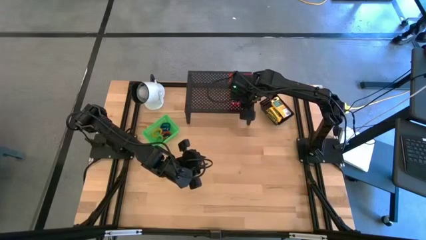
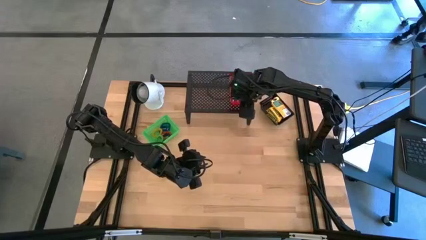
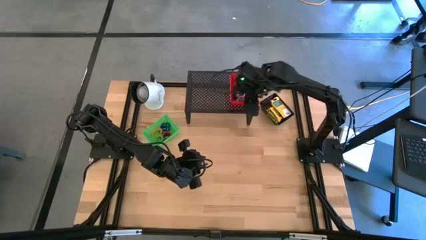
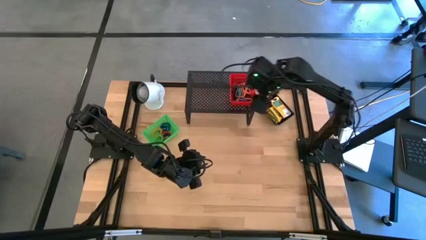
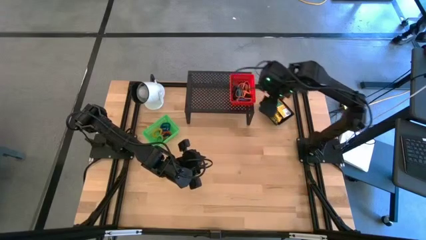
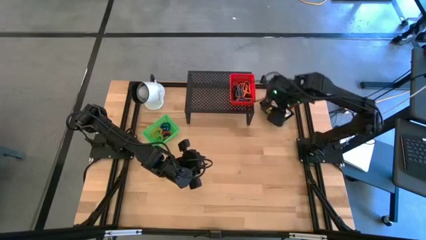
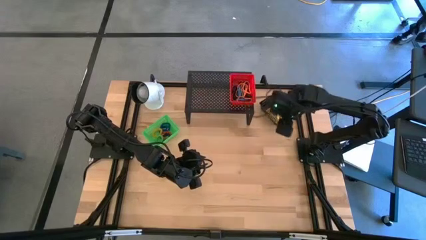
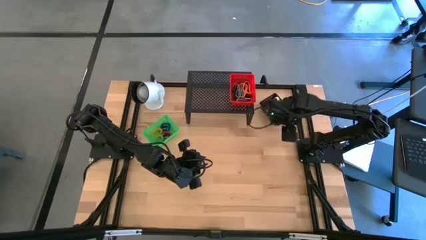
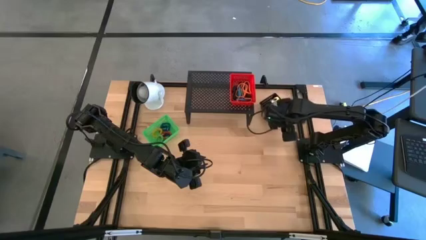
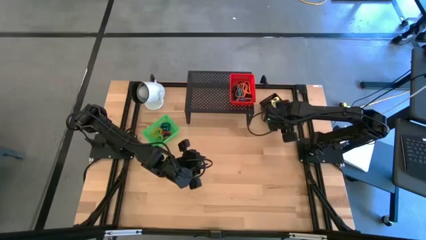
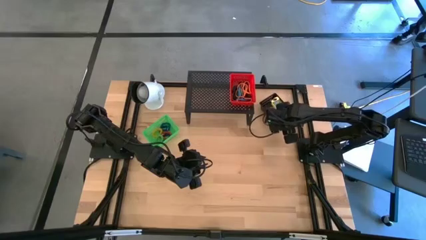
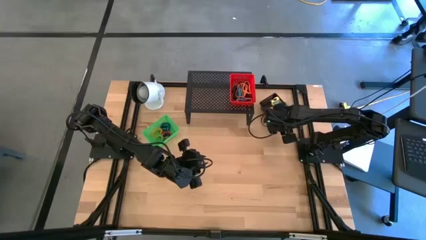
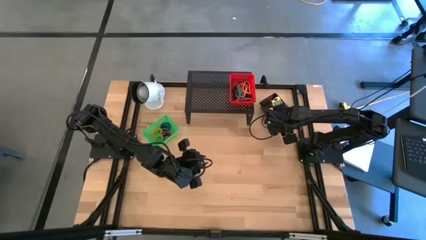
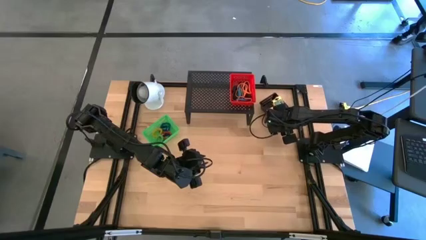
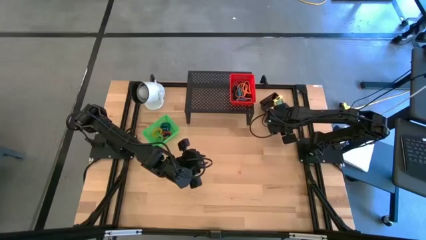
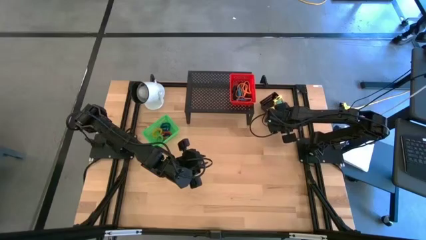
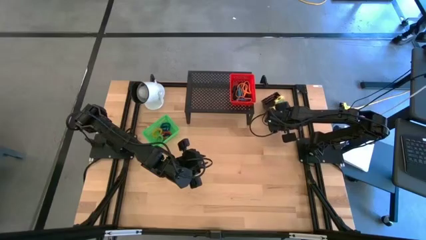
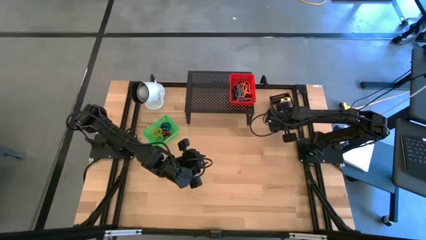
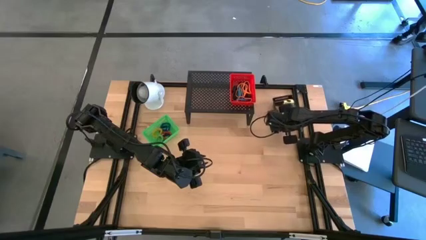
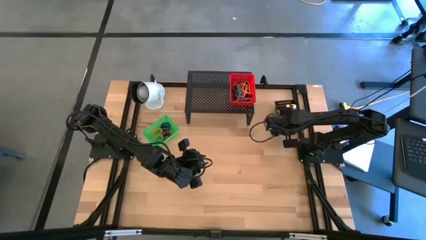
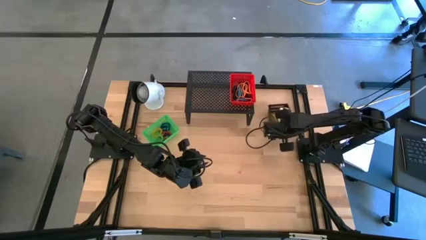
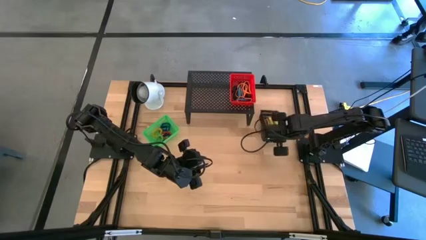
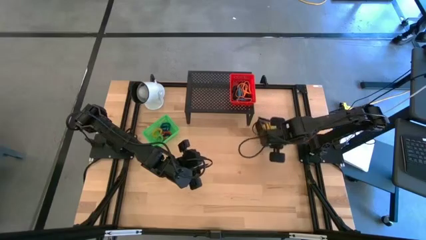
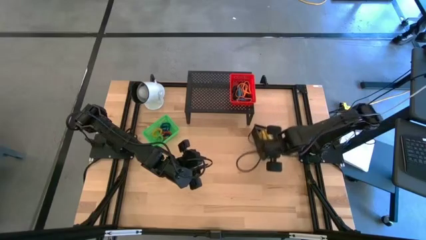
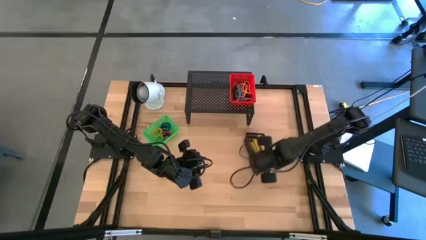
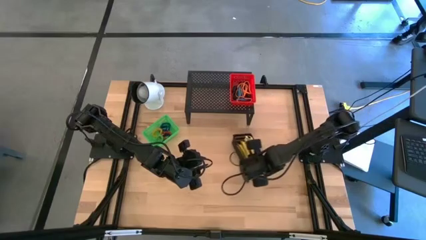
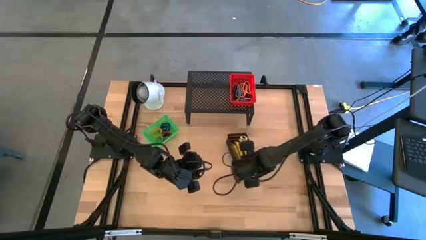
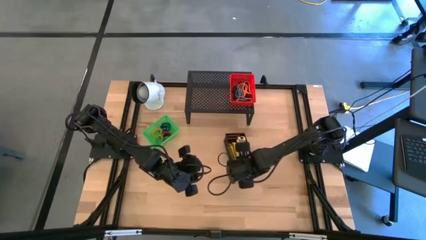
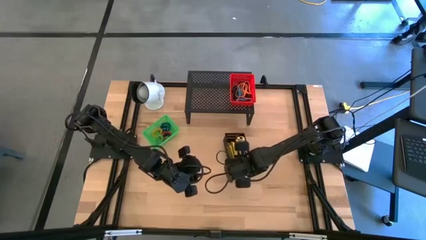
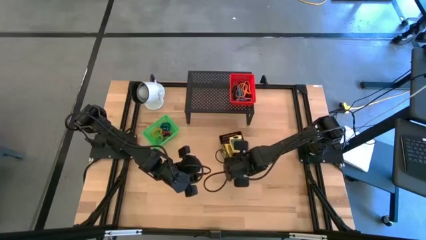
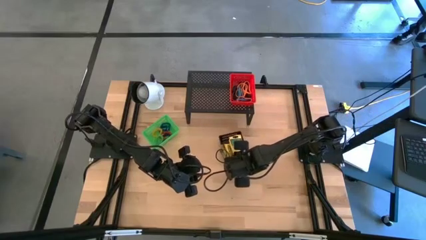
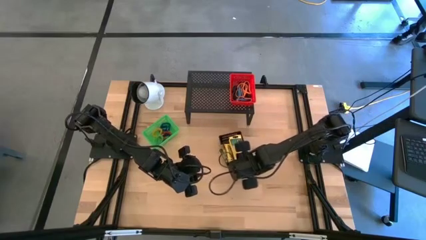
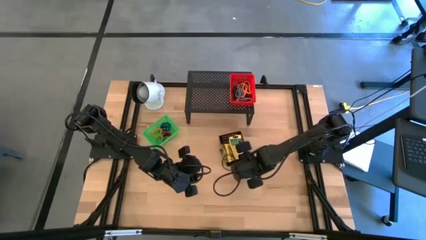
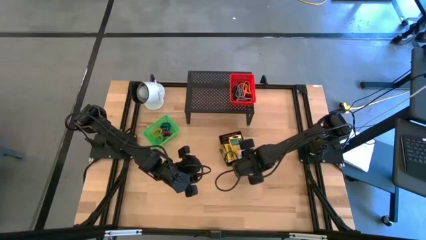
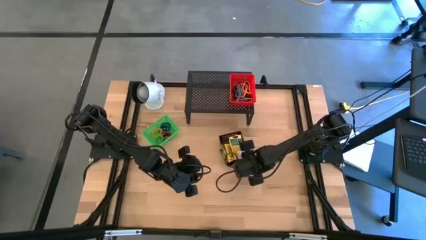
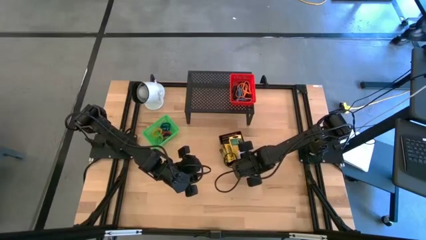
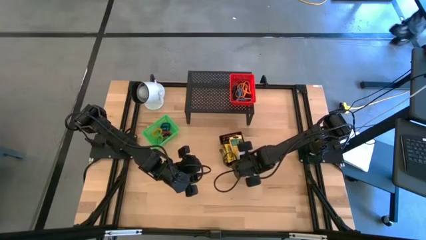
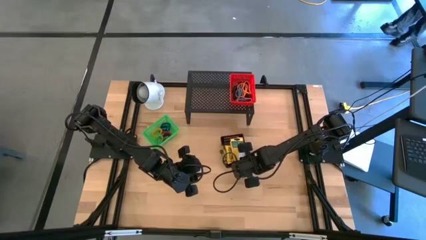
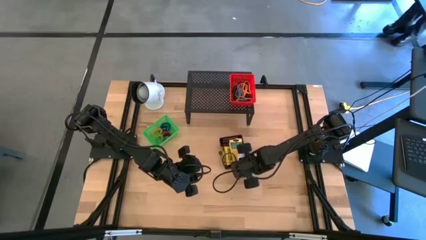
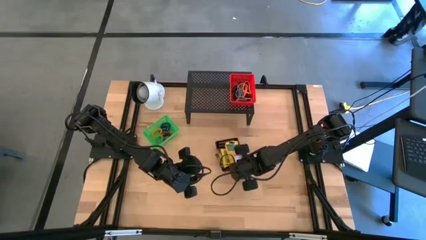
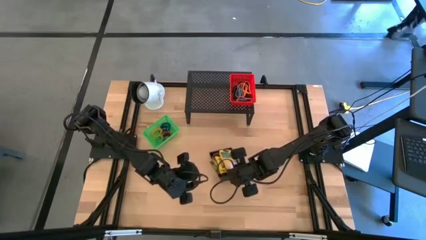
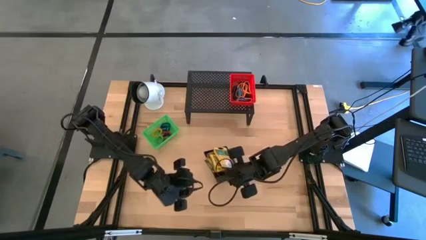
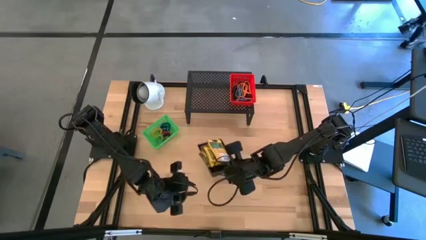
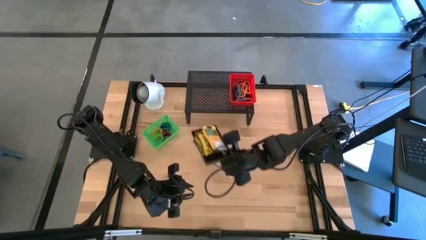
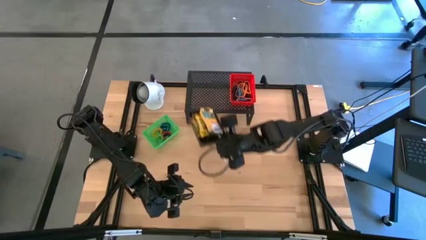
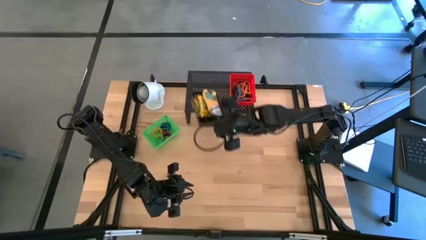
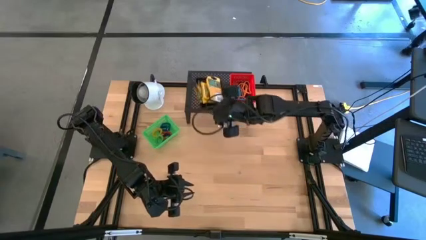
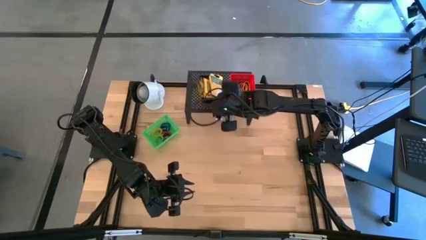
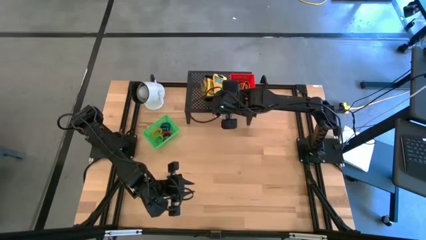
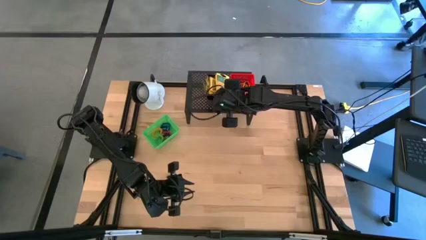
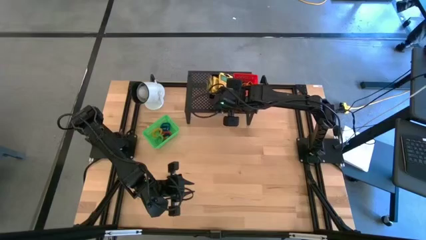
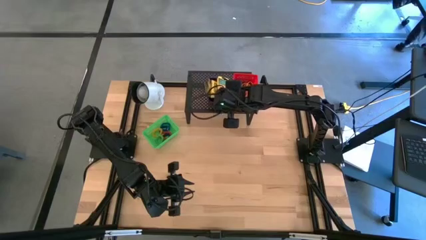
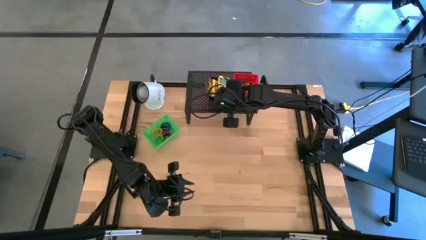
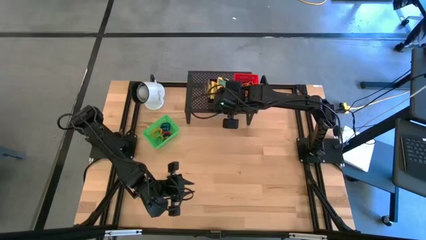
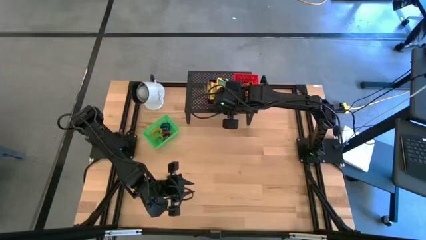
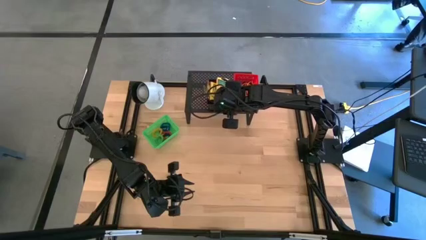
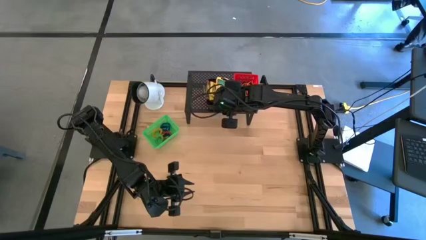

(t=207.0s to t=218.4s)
Task: Pick & Place Office Desk Supplies
Put the black bin on the shelf

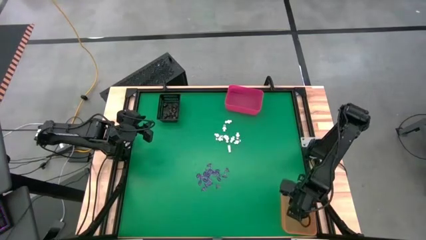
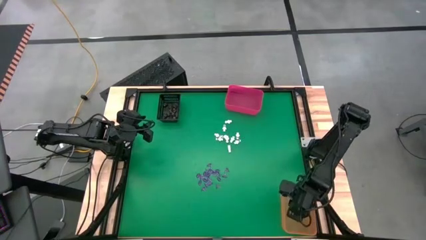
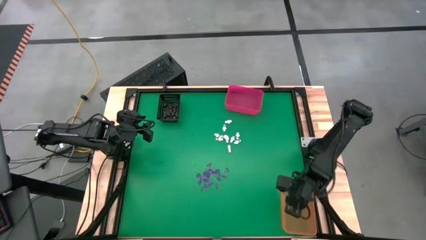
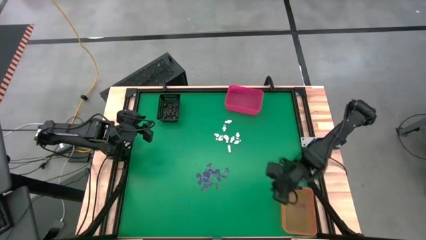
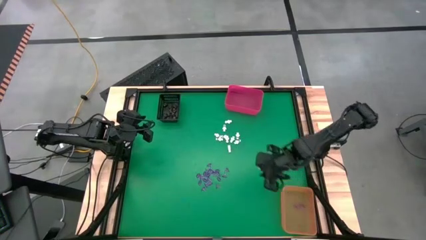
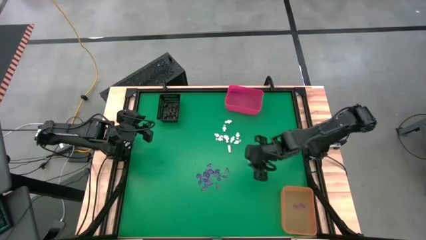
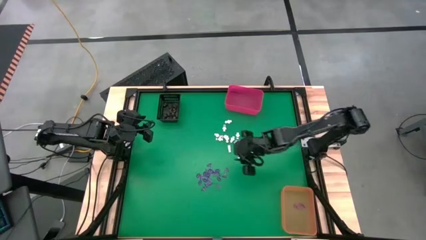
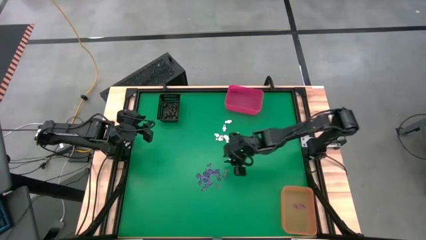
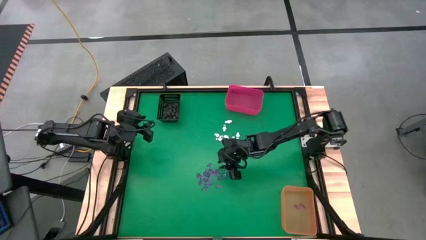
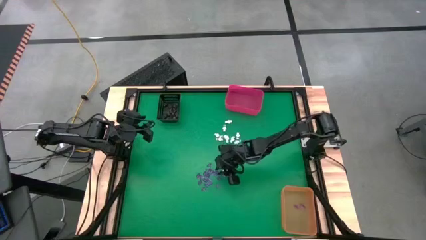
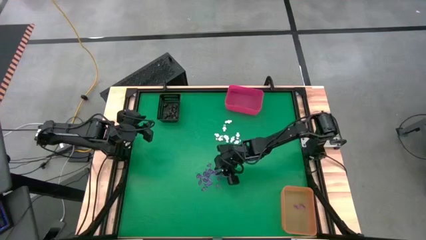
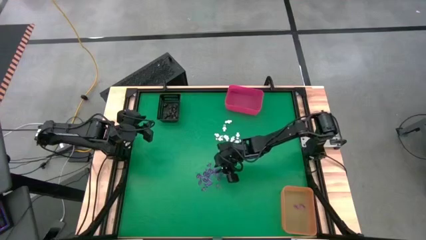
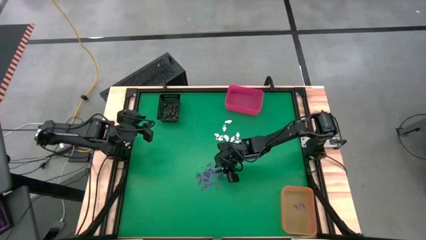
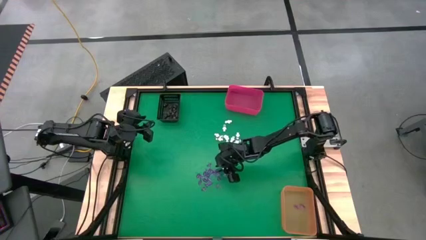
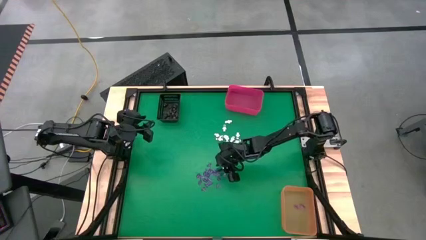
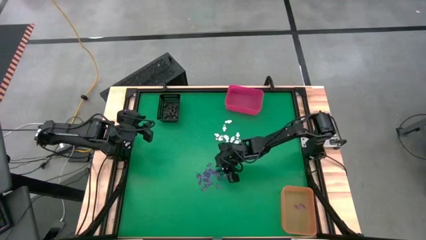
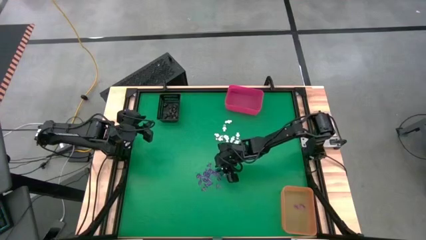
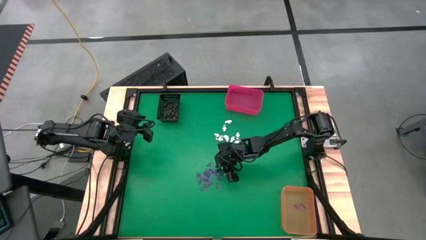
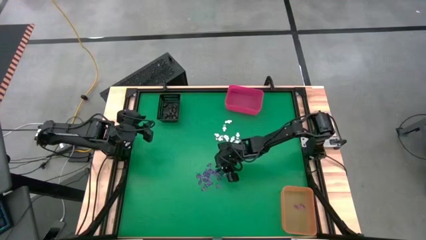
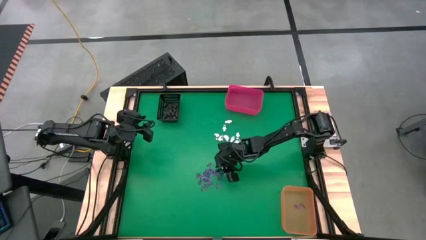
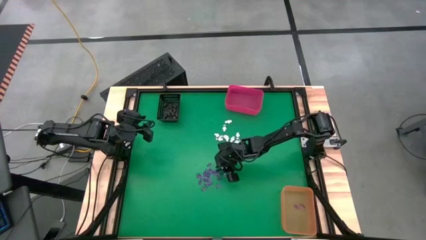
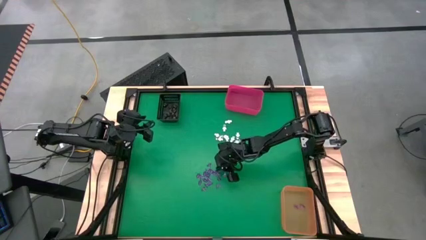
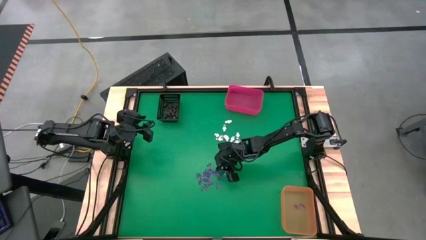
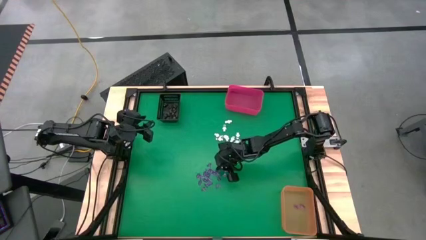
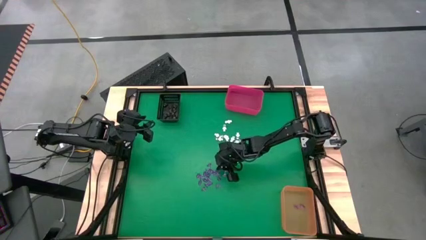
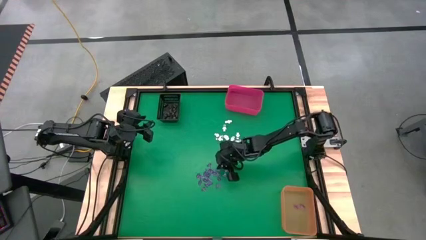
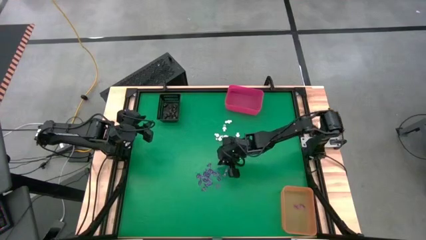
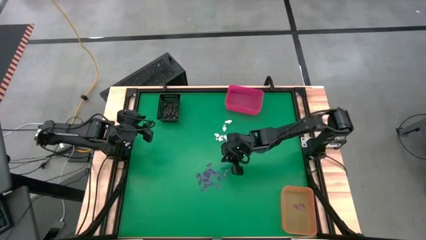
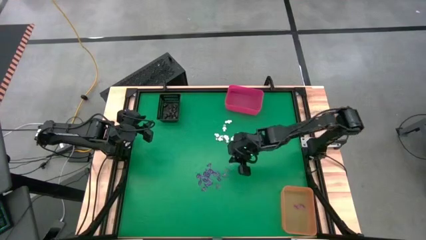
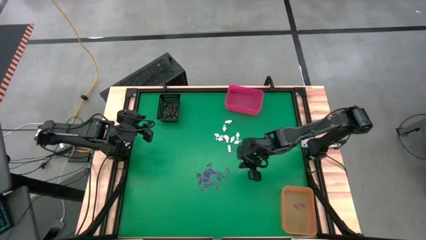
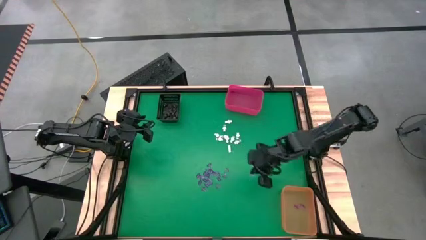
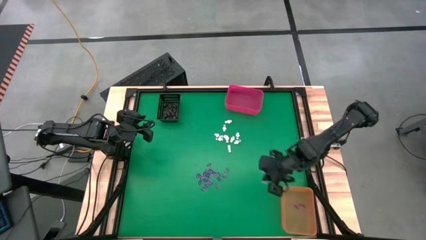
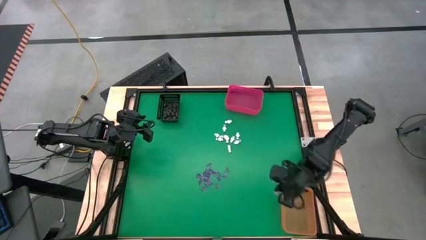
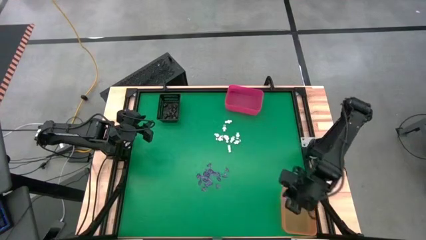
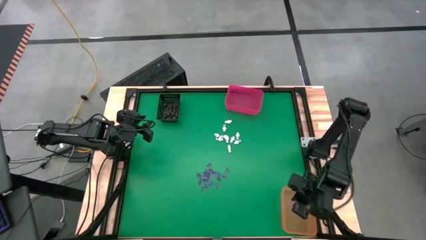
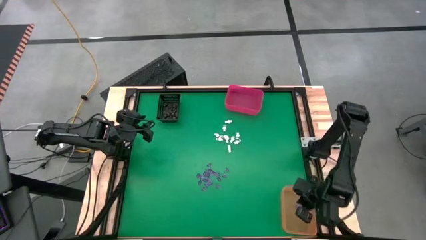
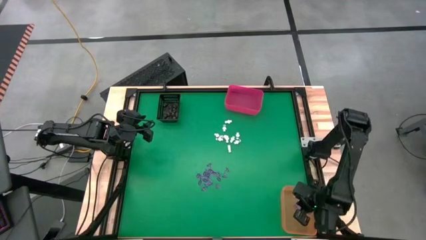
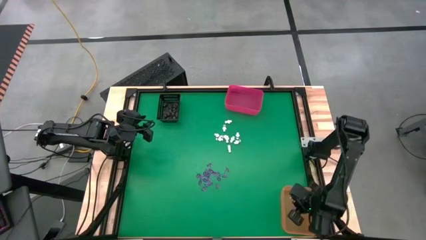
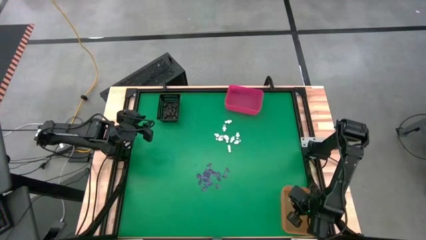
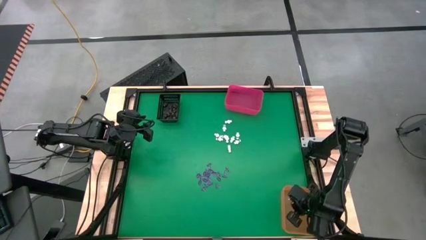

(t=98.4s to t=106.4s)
Task: Sort Halloween decoration
Put the pink witch hat toy into the orange bin
